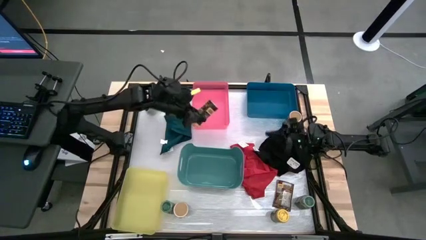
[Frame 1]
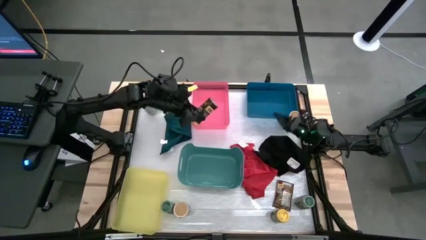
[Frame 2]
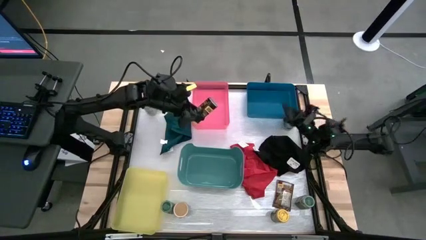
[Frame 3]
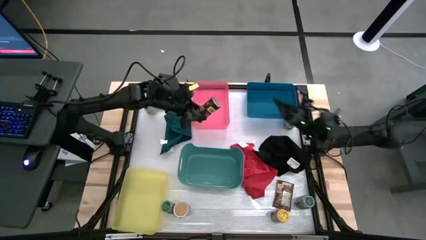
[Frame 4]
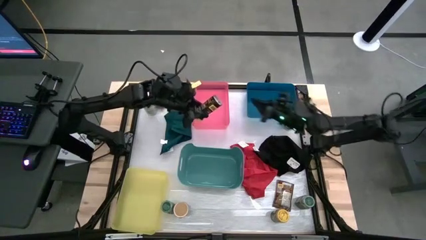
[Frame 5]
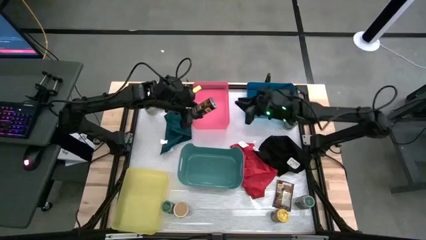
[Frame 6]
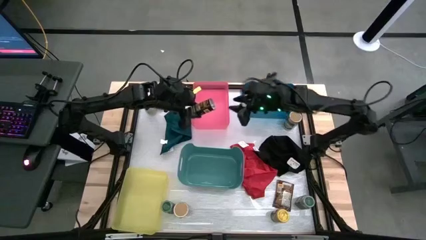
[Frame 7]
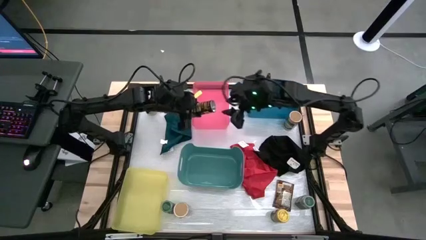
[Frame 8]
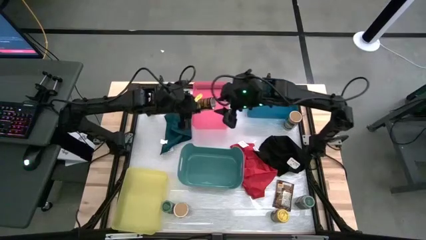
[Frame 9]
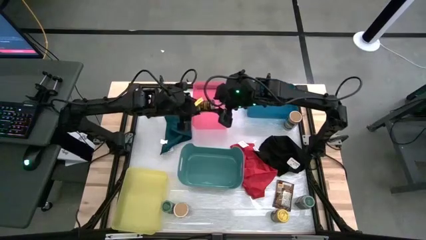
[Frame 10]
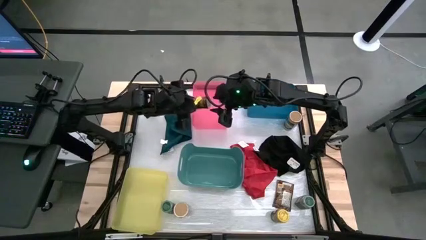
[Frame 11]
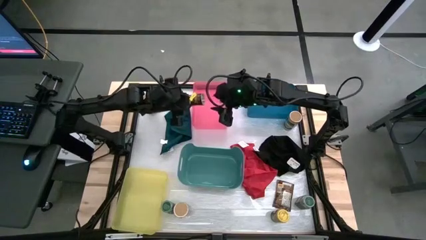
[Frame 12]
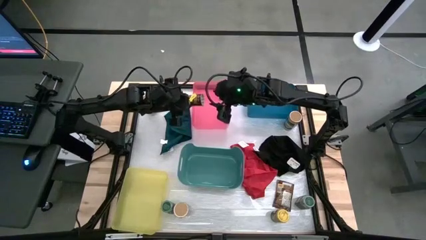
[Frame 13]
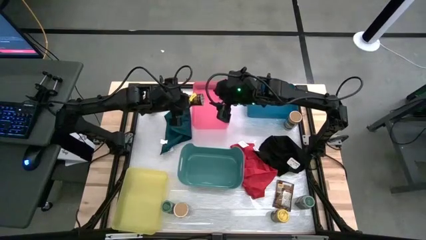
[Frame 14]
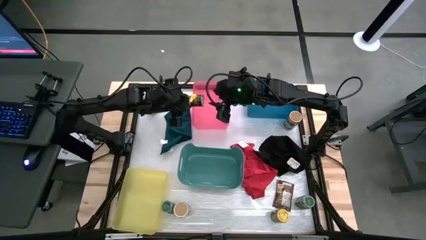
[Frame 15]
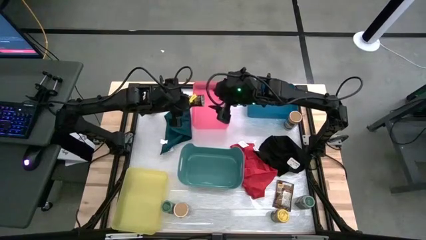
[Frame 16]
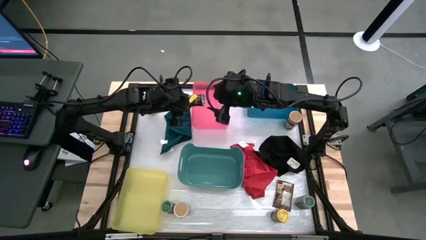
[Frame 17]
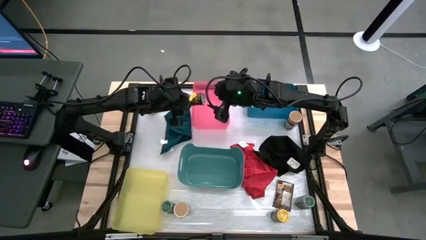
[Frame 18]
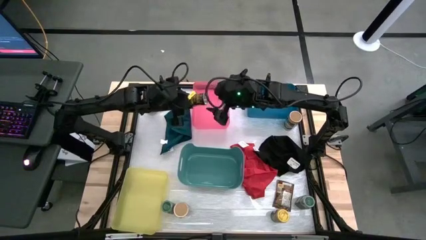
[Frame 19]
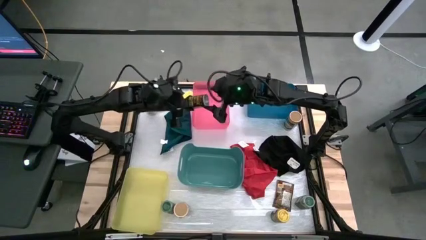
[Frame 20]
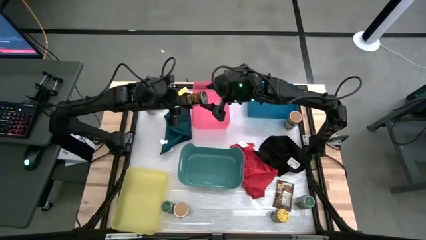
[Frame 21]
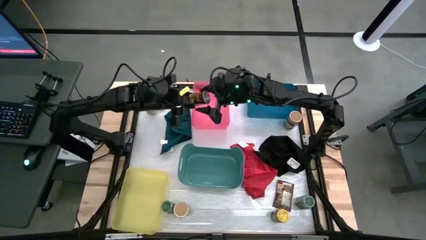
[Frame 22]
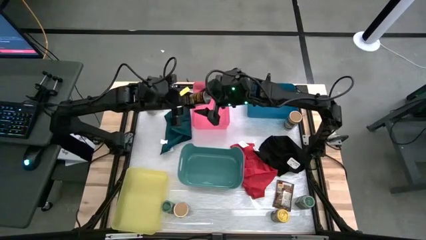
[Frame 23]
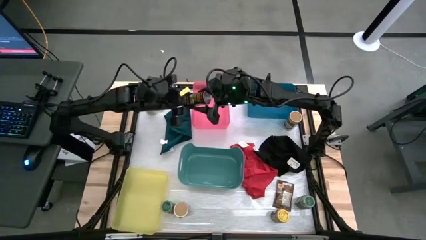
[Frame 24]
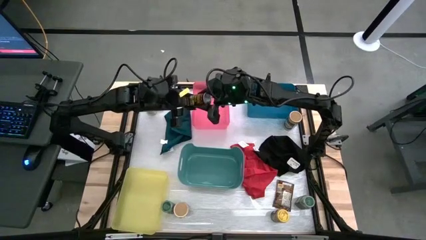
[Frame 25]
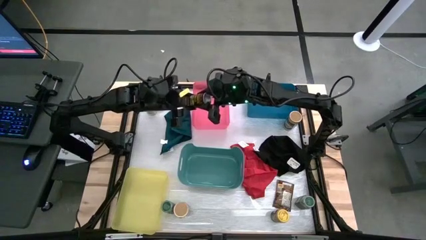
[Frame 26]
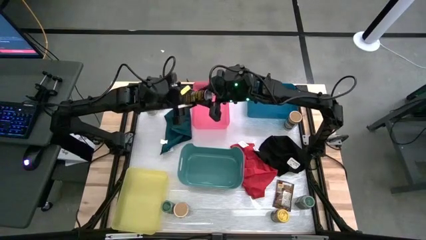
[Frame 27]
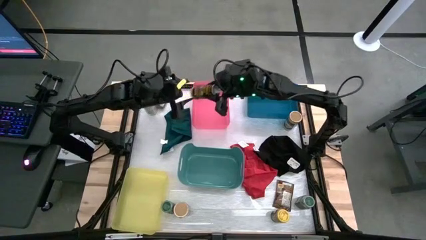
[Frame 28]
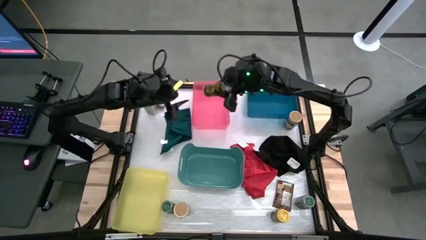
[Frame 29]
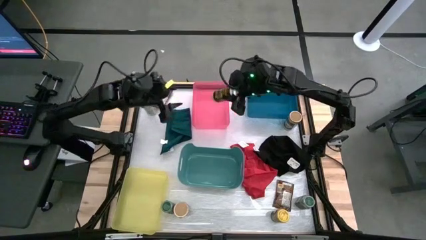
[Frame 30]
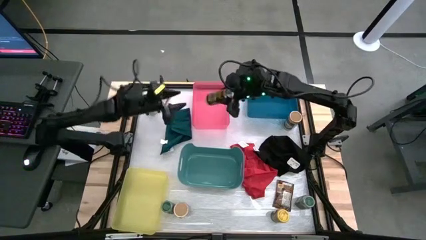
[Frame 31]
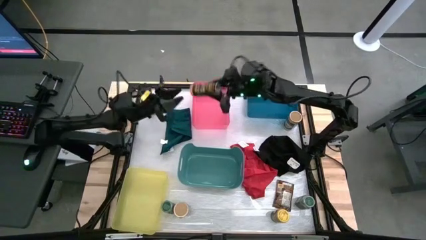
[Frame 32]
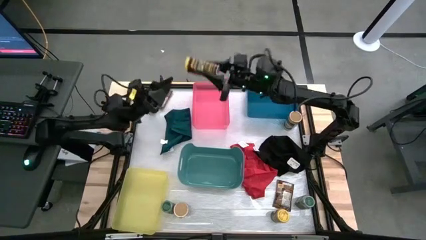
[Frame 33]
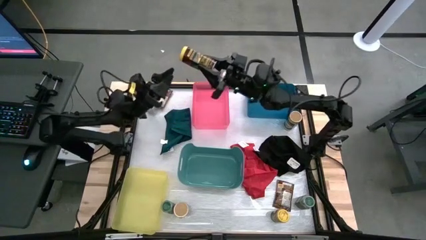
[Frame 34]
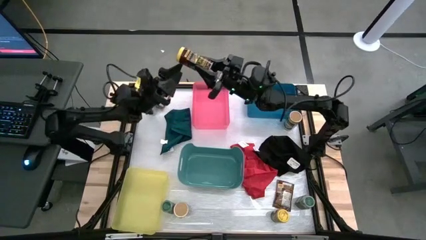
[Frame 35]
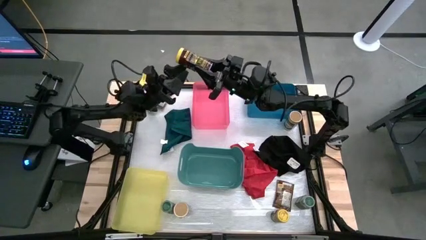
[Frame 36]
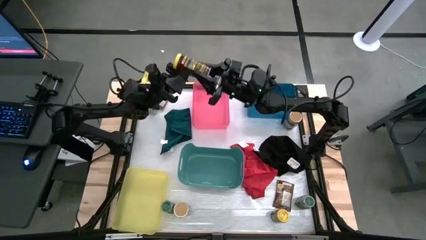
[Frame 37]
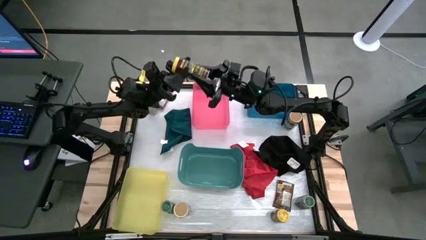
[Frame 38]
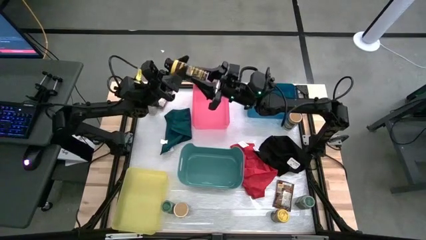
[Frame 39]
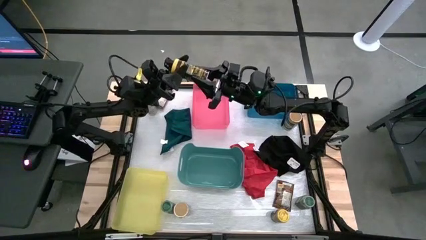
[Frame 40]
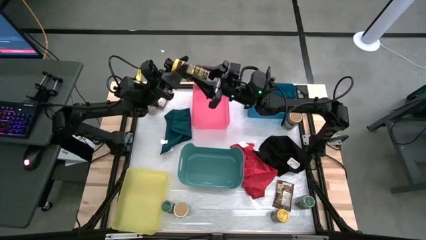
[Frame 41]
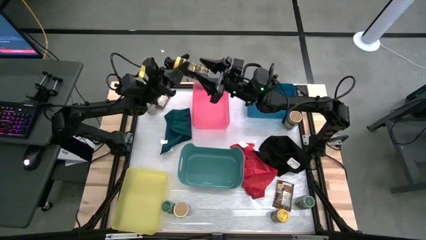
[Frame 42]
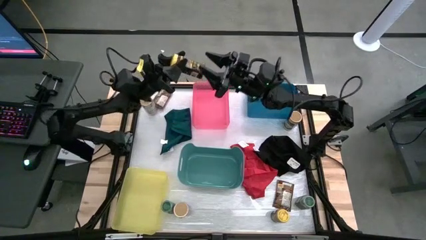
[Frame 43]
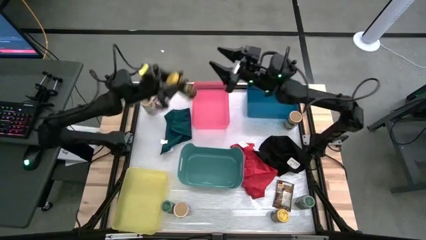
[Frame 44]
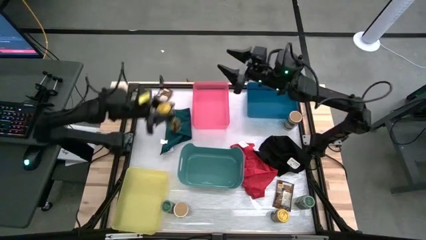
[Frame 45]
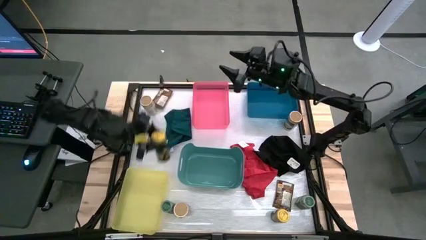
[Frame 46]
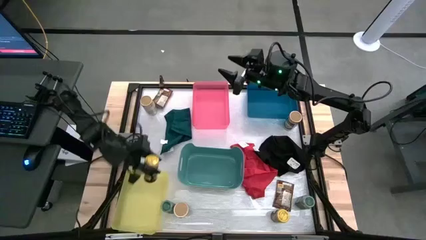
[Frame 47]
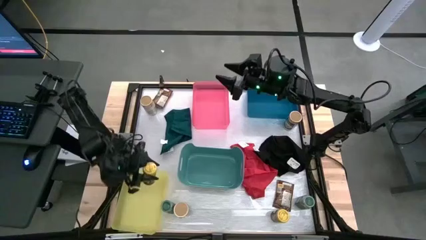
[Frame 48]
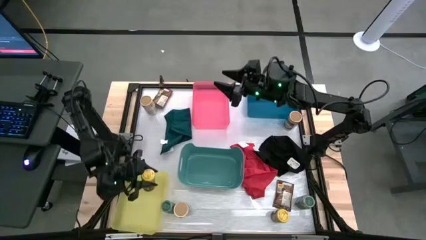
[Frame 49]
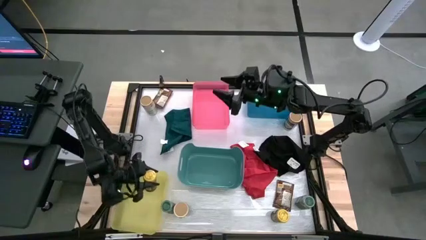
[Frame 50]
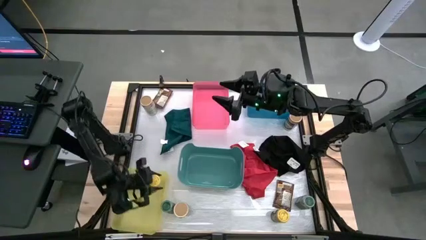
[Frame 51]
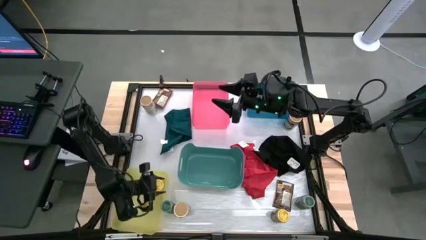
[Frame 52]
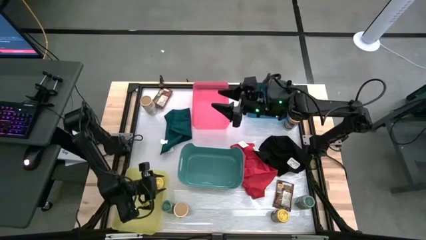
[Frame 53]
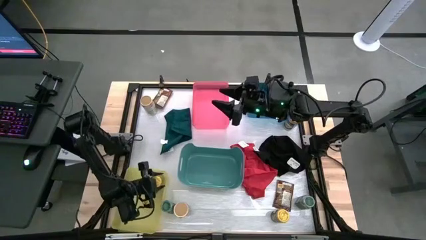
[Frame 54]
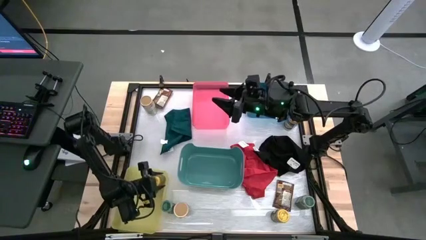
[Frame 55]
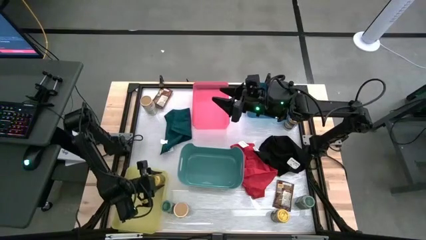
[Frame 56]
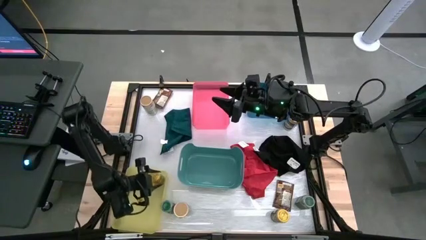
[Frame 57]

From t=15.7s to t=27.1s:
Task: Sort spices by type
Put the top yellow seasoning bottle into the yellow bin
